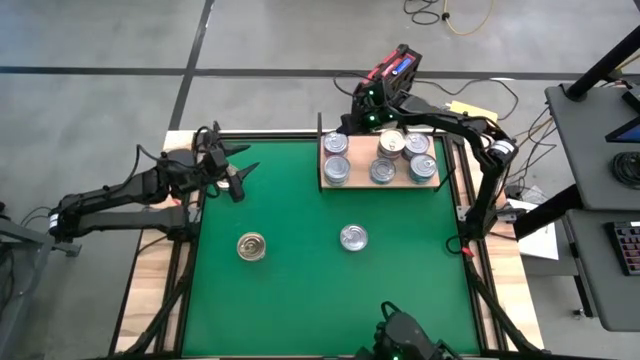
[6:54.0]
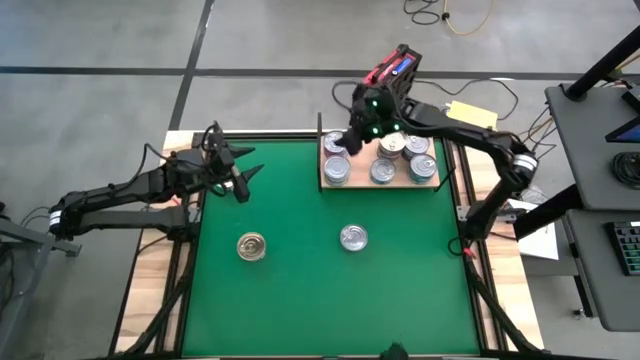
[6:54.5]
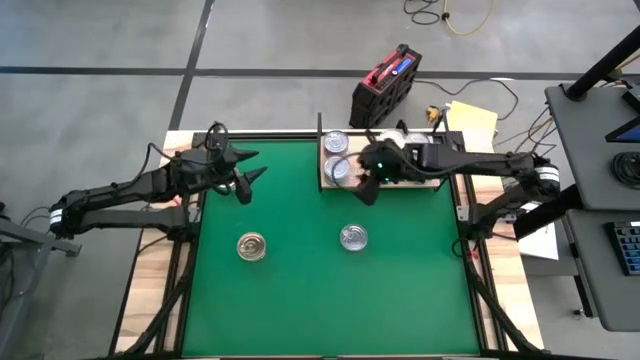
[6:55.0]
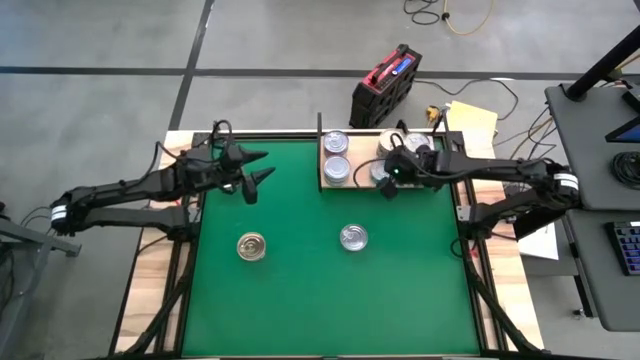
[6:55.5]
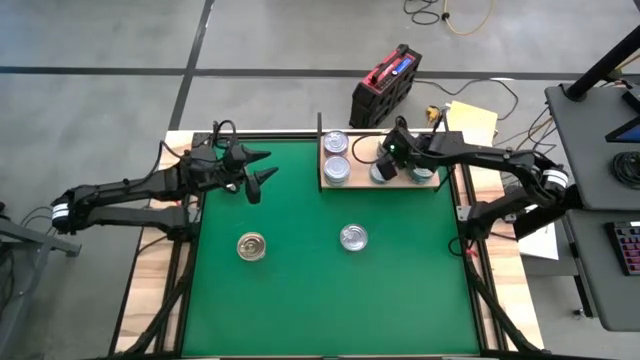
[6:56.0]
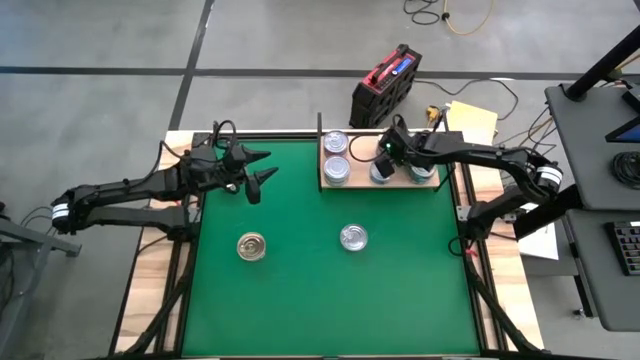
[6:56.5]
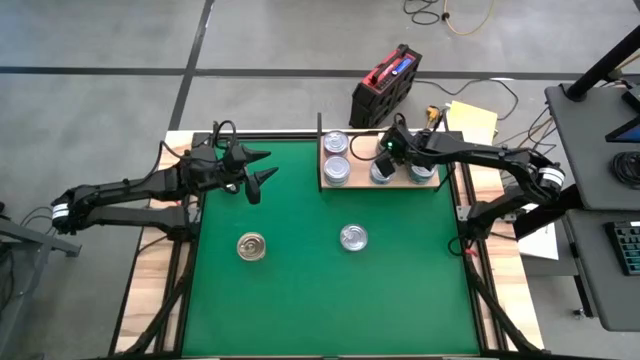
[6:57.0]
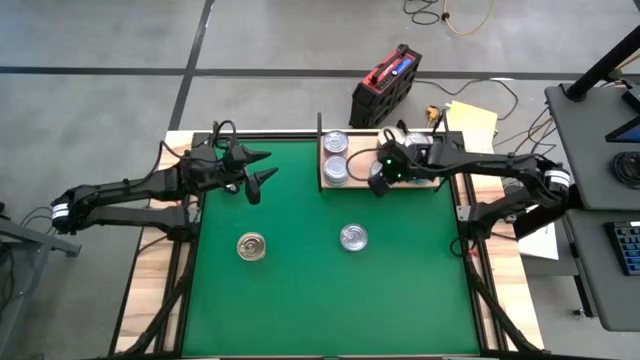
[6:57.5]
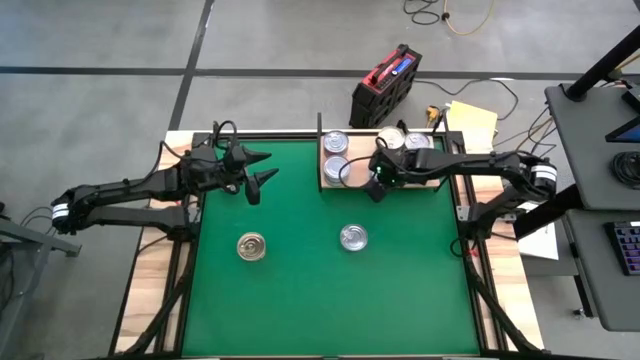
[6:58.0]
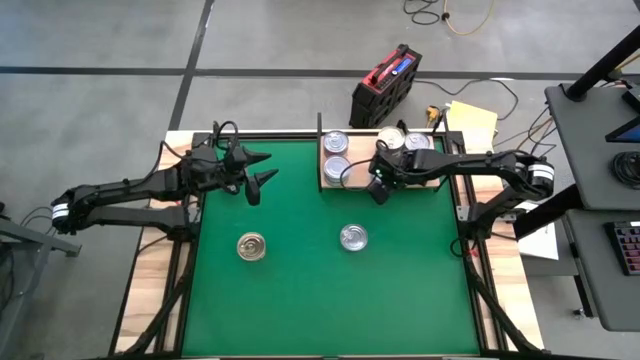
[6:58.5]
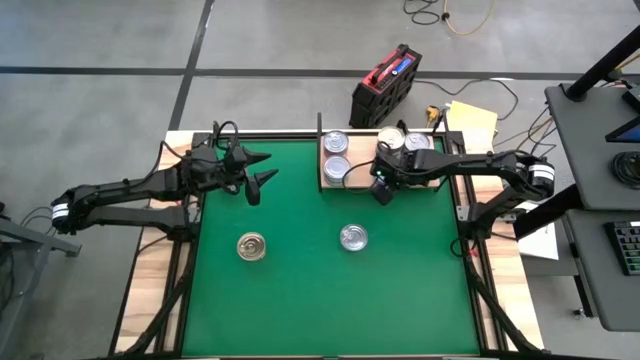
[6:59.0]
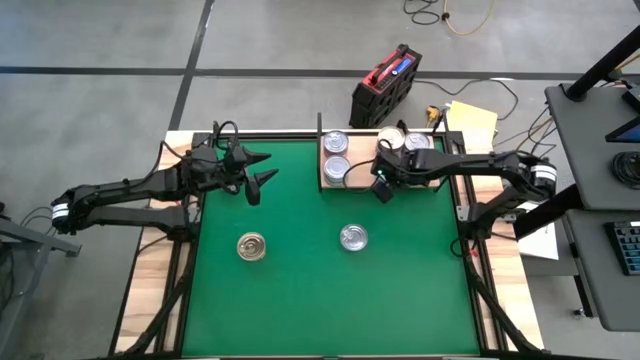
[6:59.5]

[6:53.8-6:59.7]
Task: Stack canned seafood by type on shelf
Adjust the tuna cans on the shelf

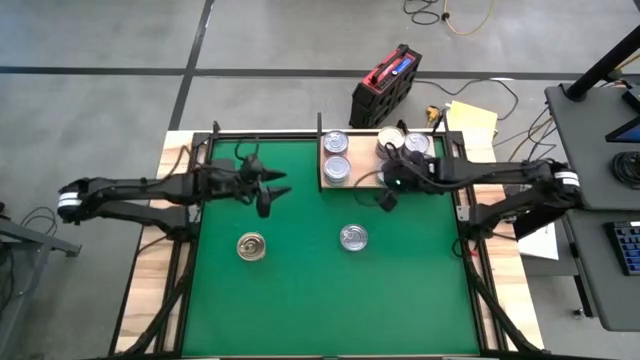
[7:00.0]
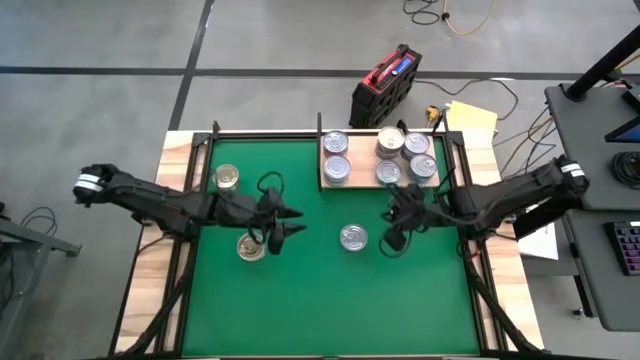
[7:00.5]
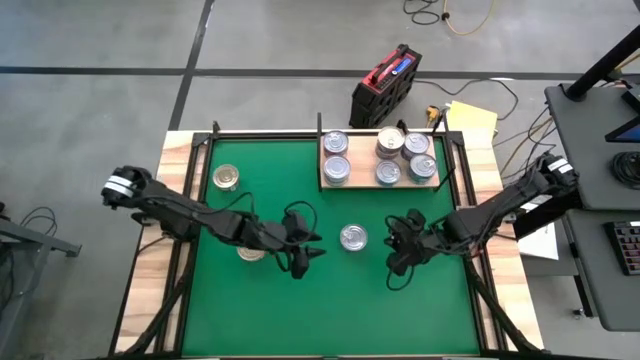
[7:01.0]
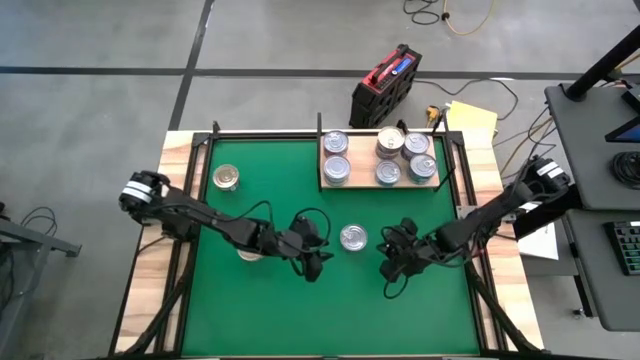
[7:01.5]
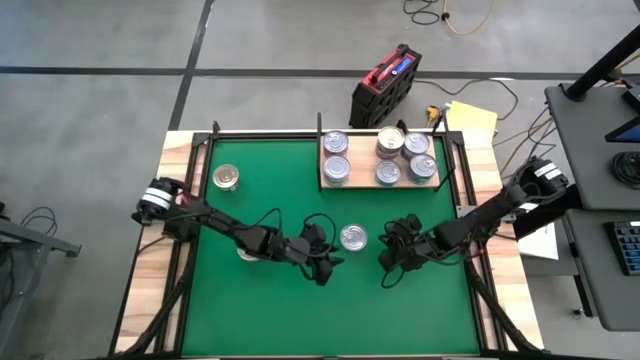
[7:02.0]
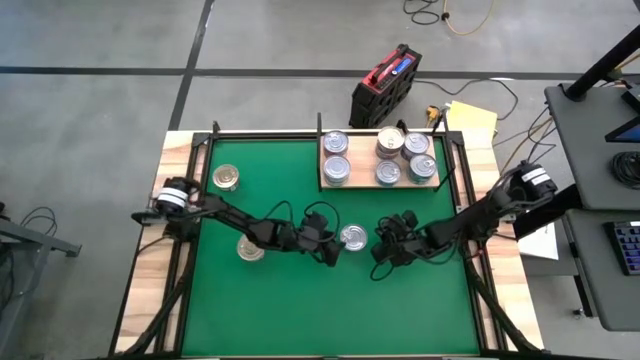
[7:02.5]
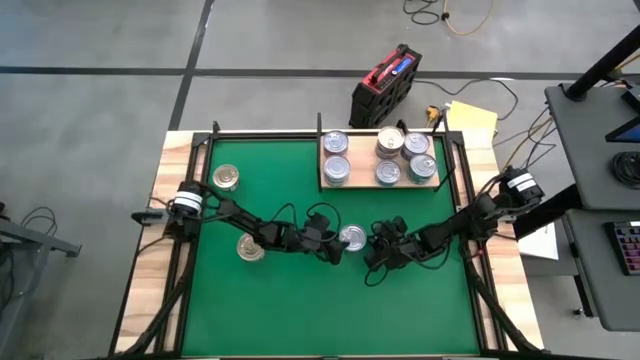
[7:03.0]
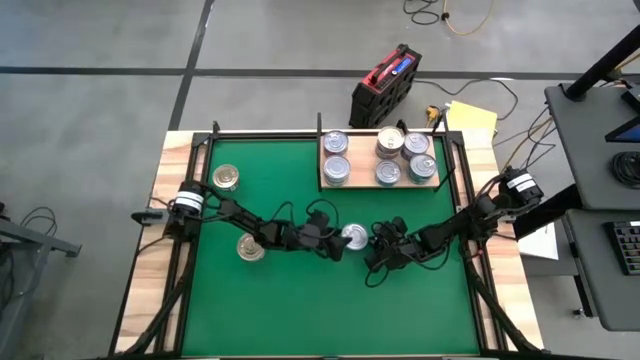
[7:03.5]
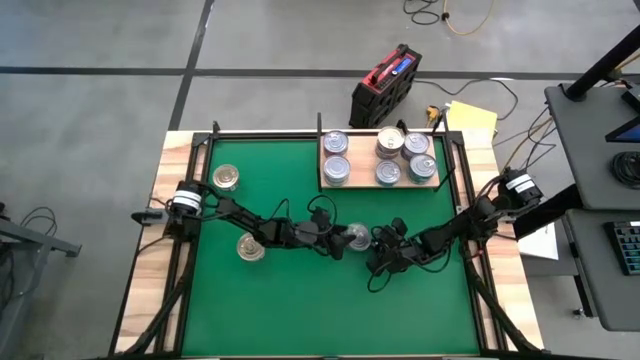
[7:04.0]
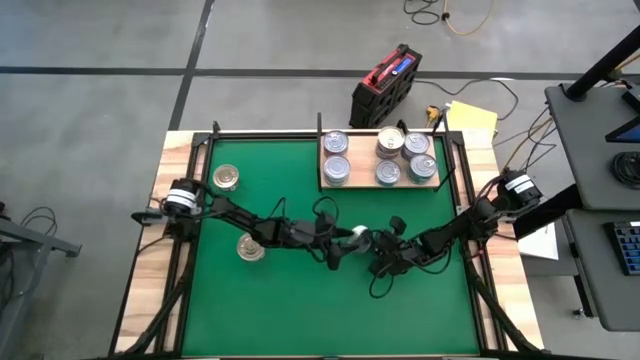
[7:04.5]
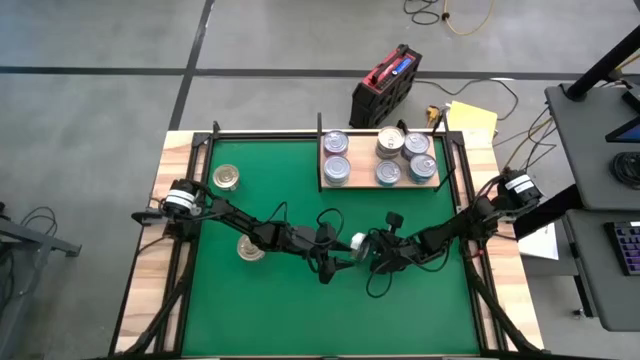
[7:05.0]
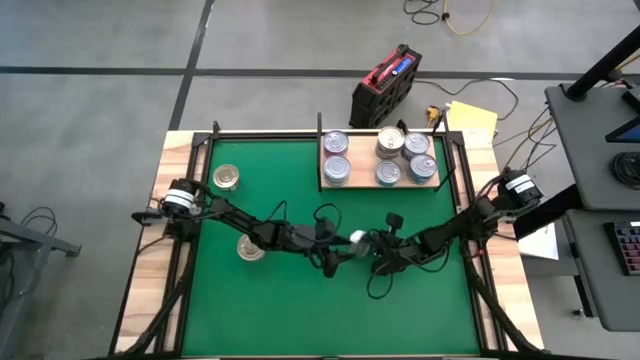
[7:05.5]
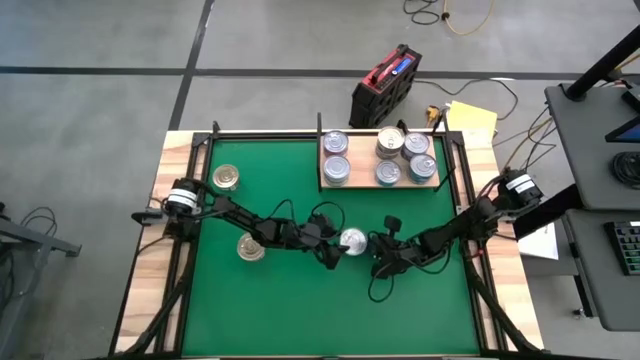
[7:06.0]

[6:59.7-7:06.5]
Put the green tuna can on the shelf

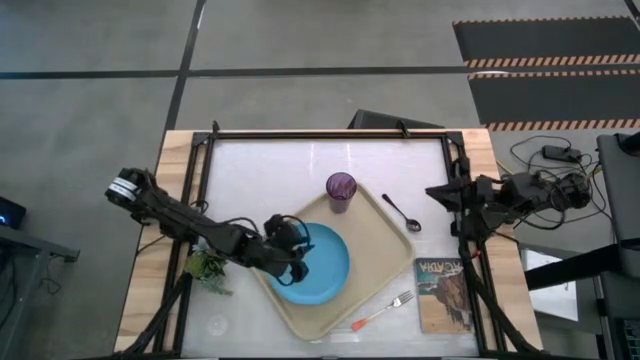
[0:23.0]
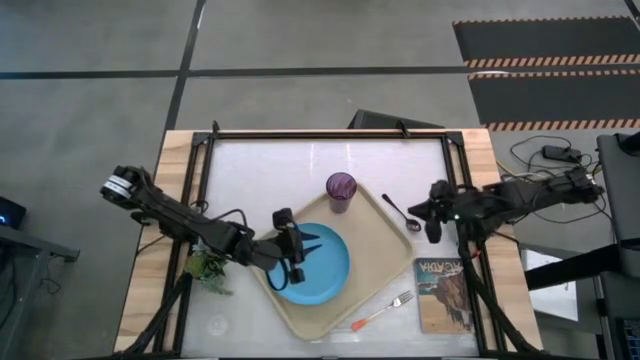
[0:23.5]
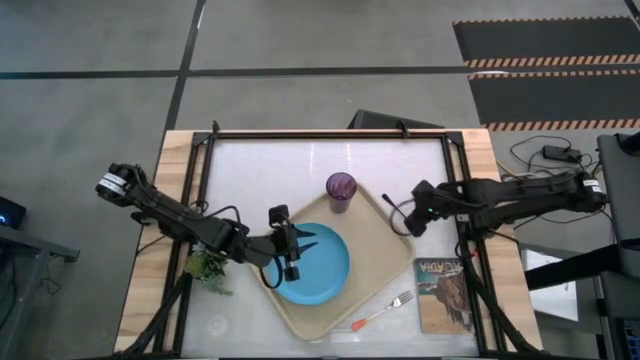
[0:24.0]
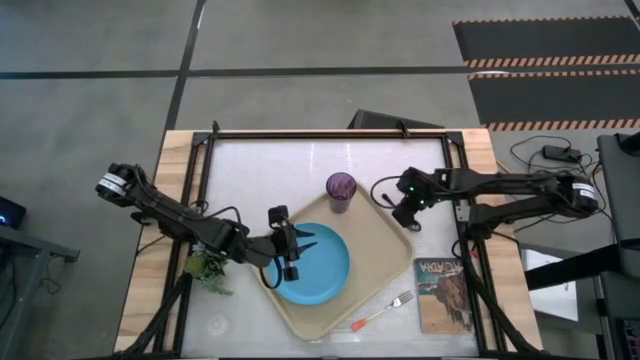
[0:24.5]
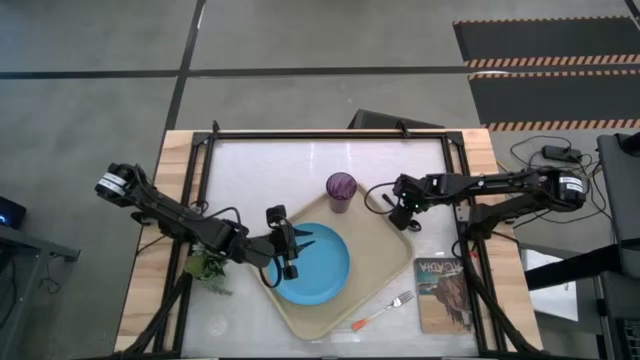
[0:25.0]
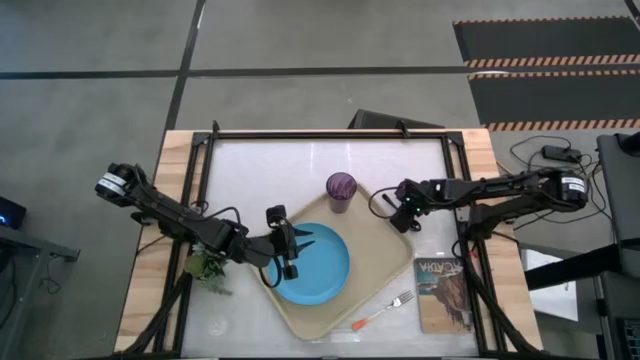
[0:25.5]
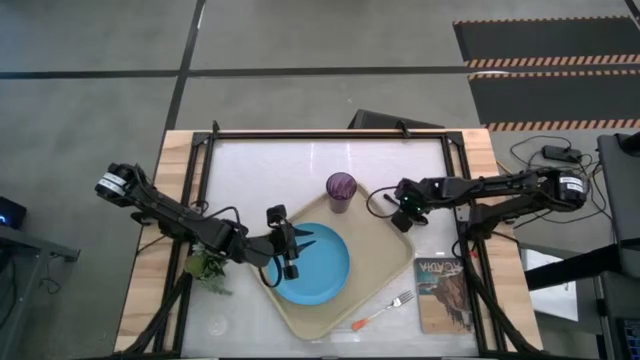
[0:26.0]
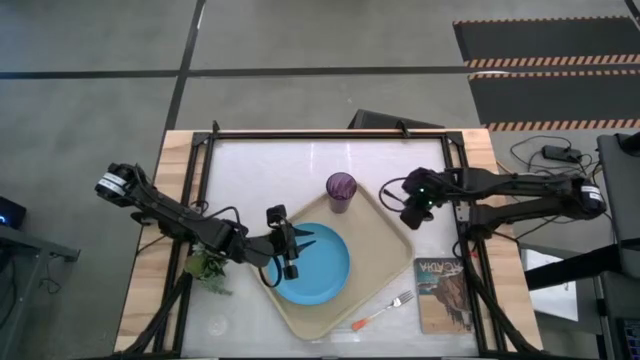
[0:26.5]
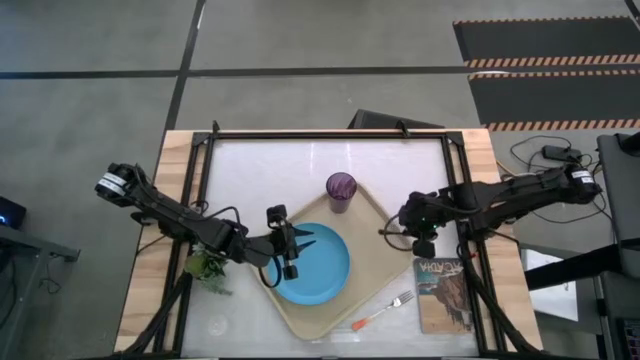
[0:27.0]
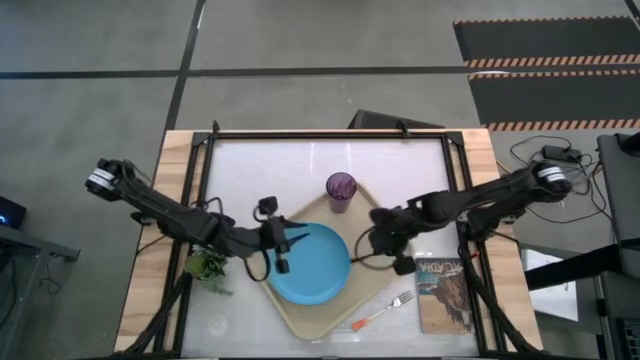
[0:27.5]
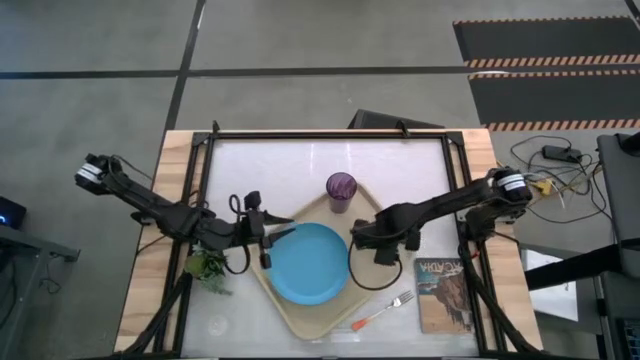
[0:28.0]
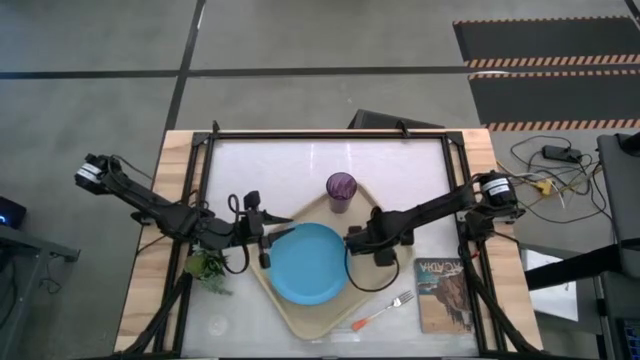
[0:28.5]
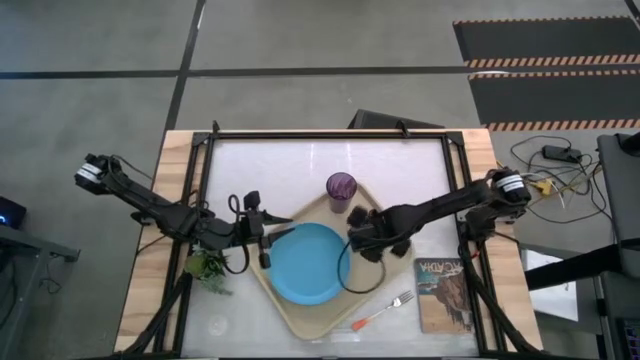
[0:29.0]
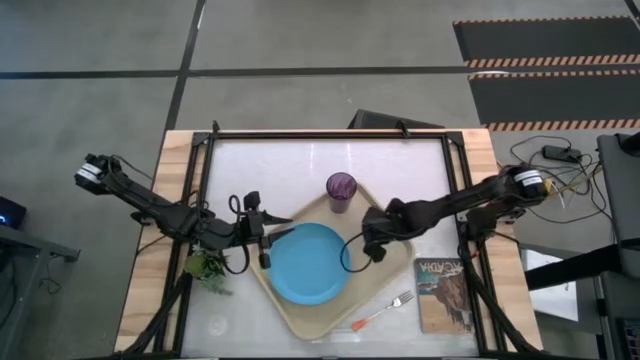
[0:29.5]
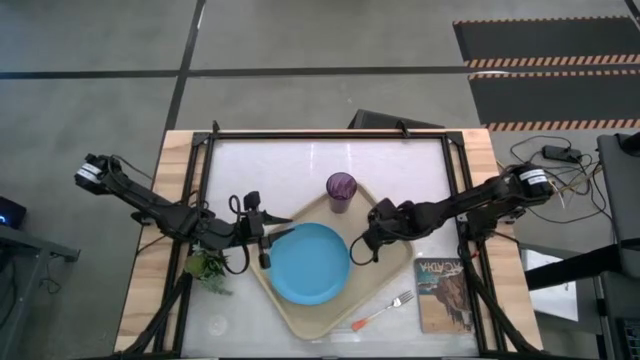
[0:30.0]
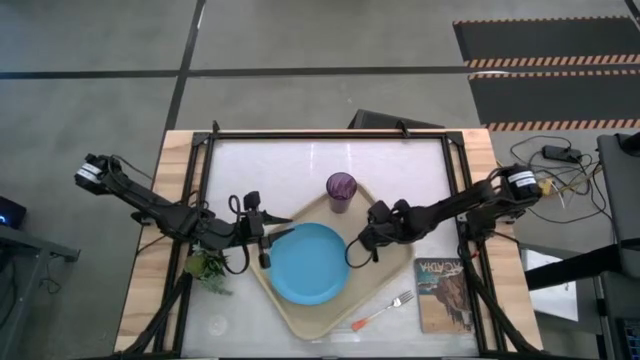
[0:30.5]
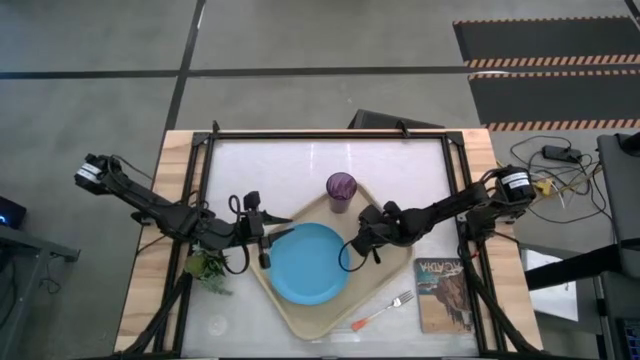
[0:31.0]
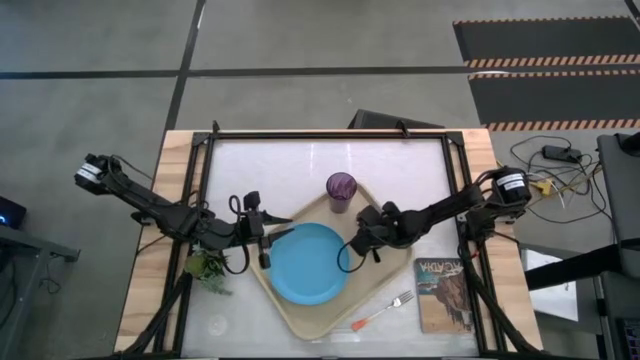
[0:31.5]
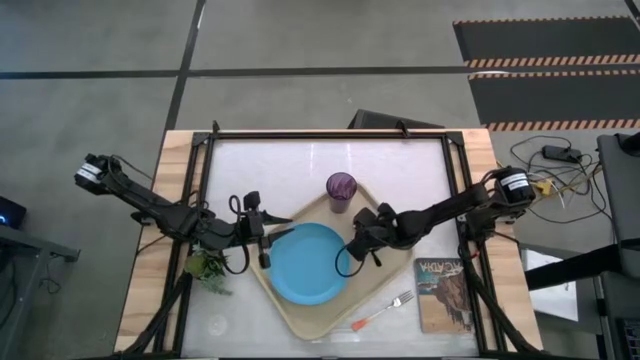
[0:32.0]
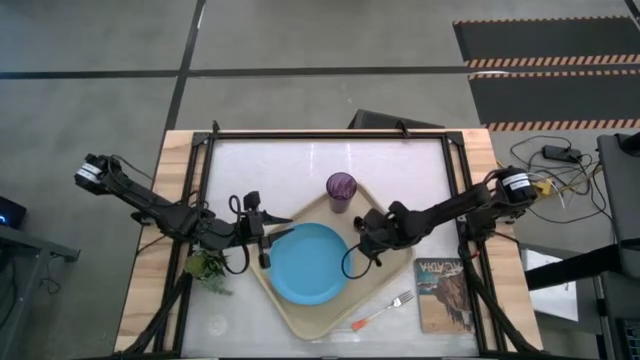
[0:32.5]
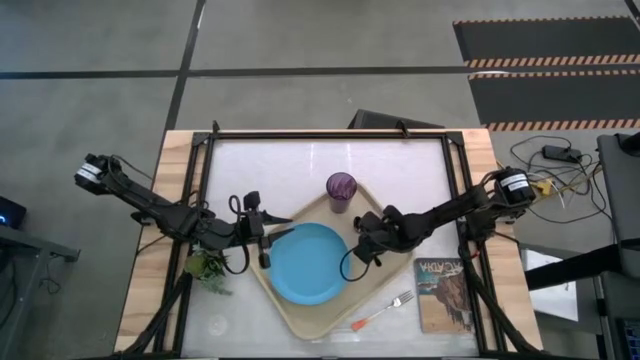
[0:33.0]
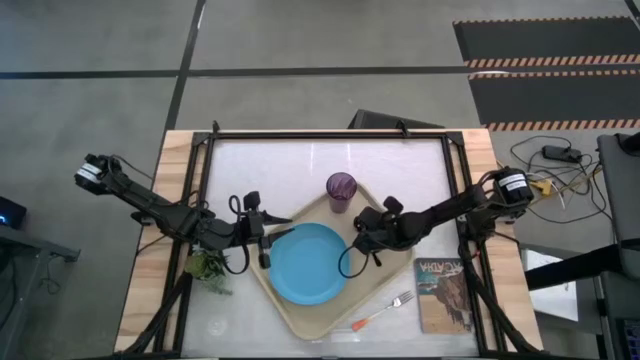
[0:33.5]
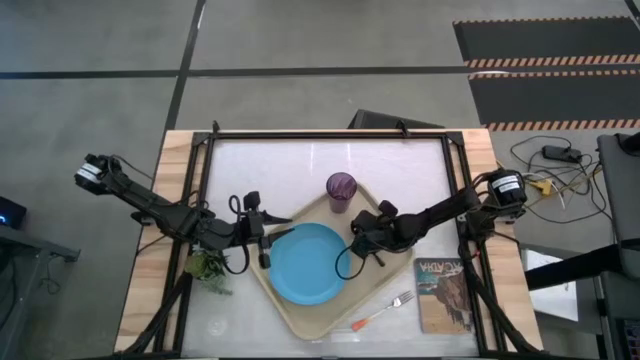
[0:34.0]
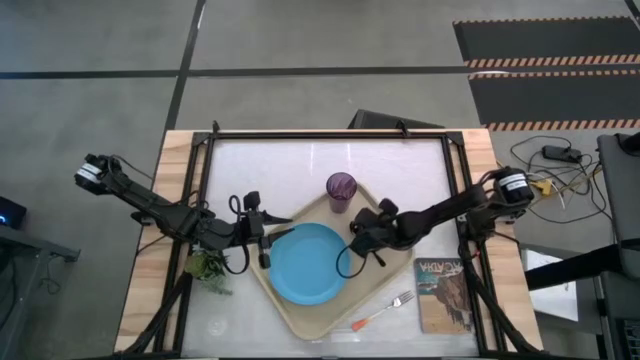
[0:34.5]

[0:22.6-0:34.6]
Task: Pick and place plate/cup/fork/spoon on tray
Put the spoon beside the blue plate on the light brown tray
